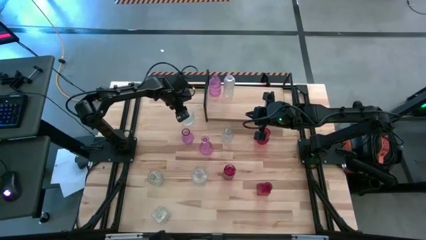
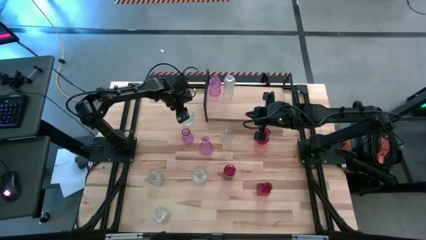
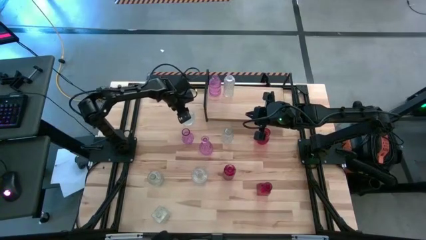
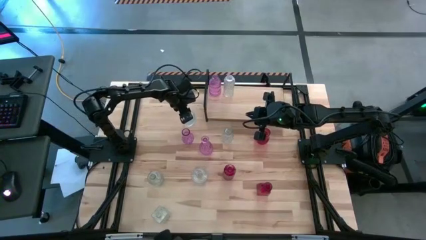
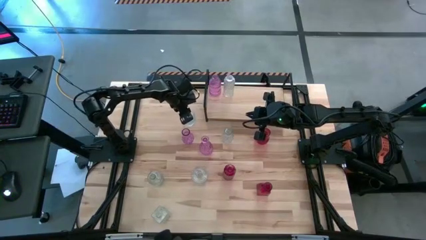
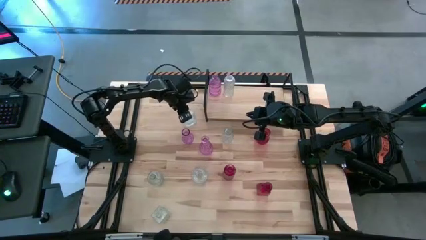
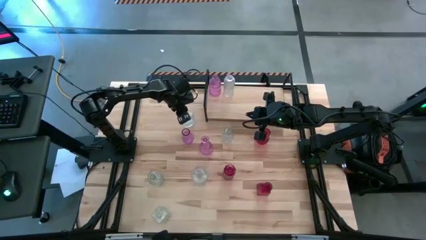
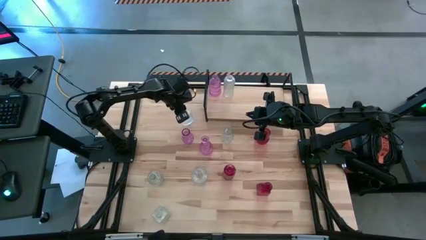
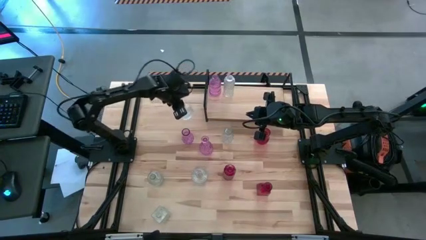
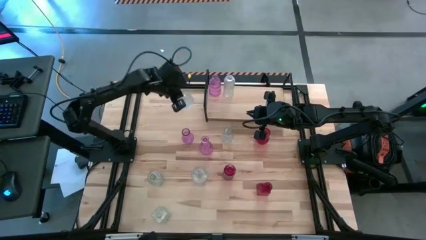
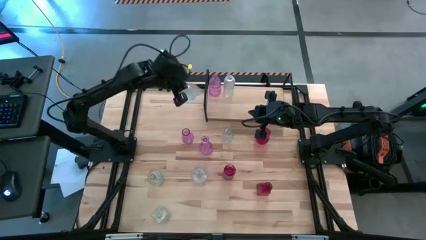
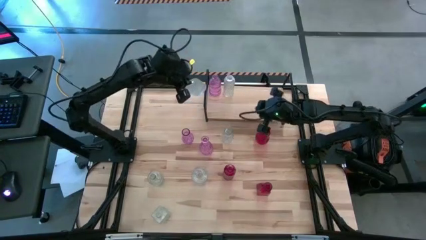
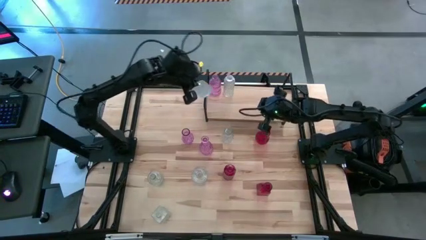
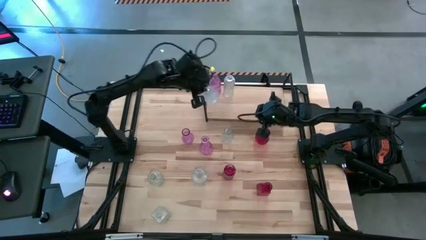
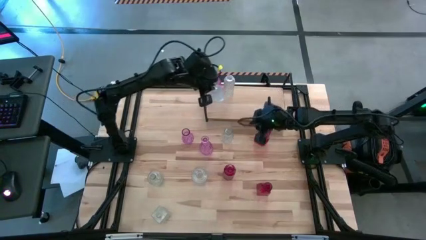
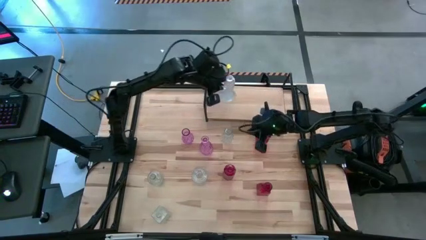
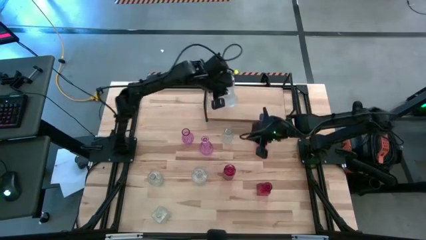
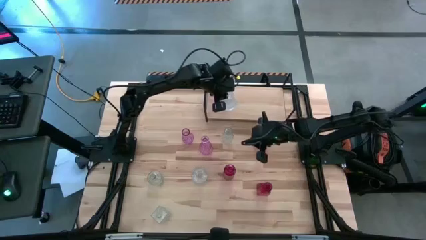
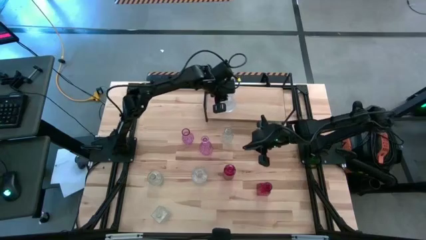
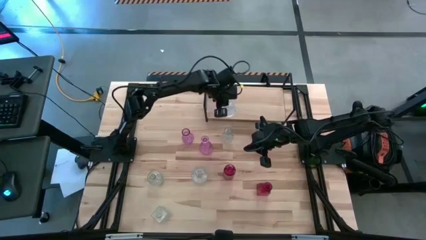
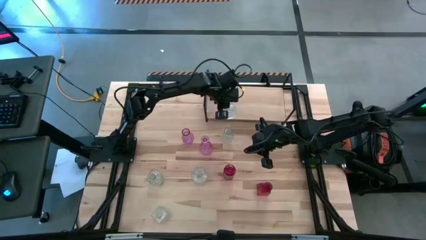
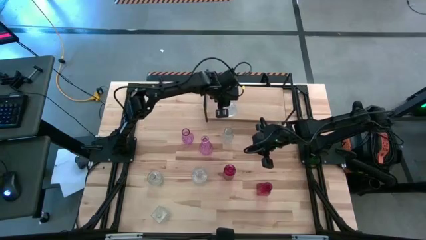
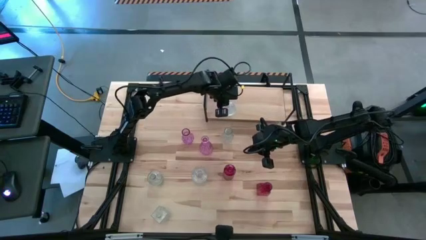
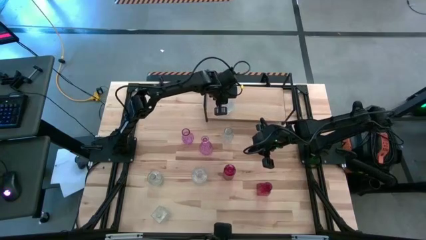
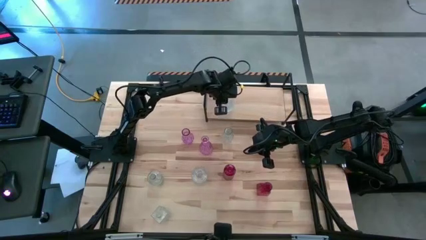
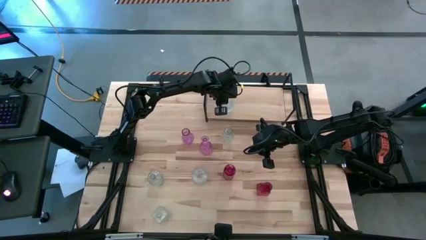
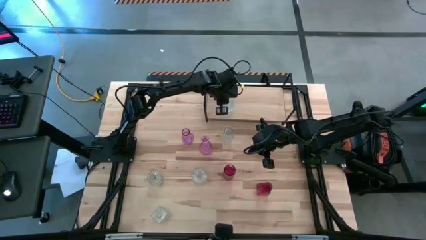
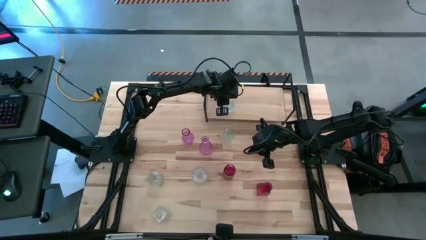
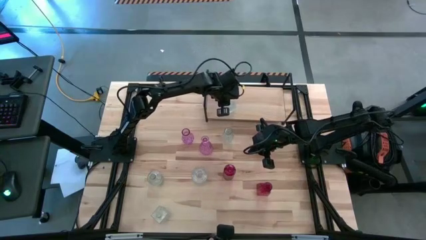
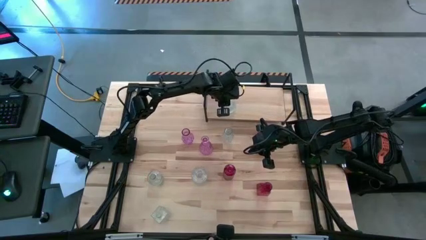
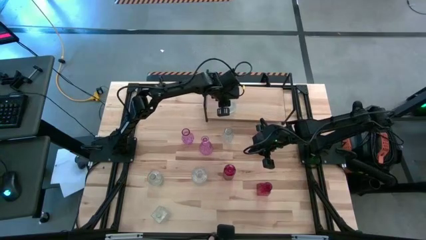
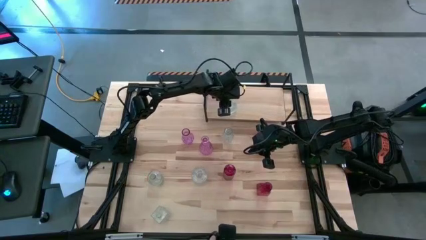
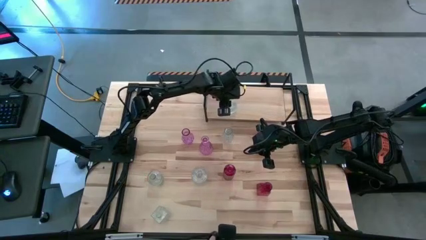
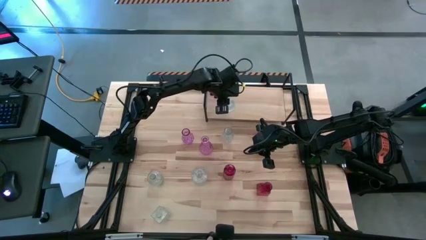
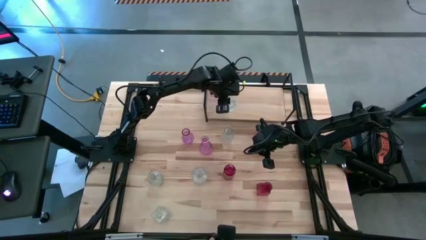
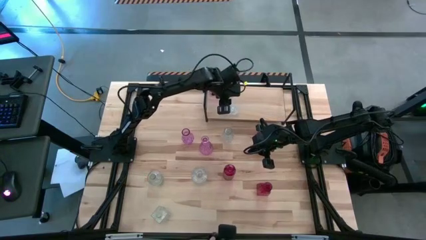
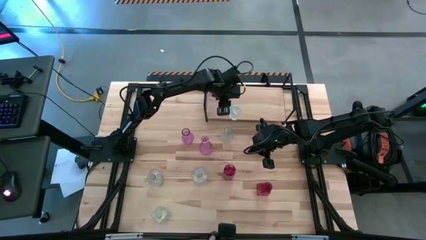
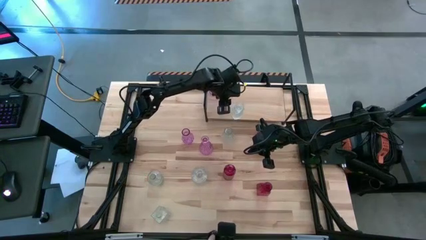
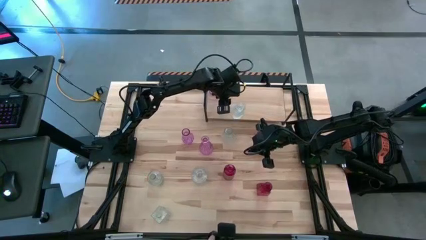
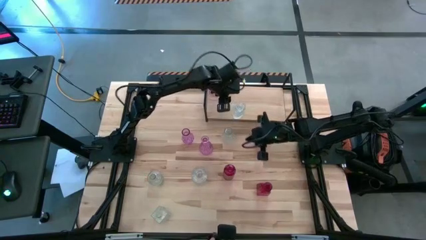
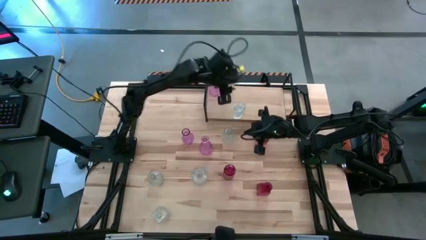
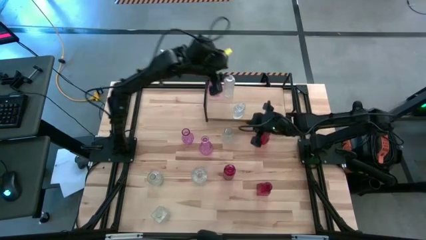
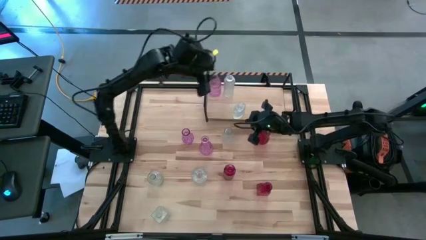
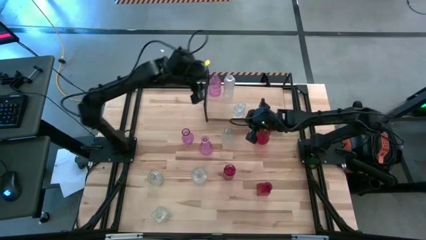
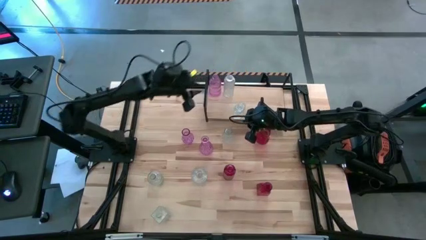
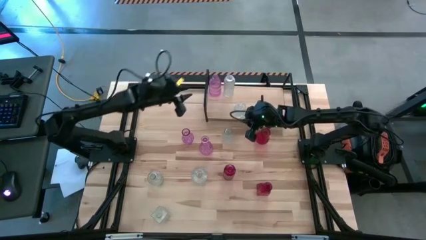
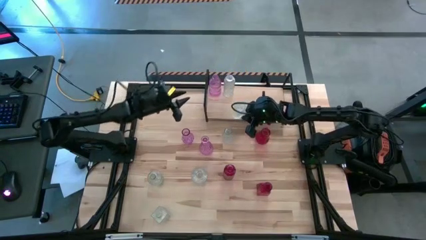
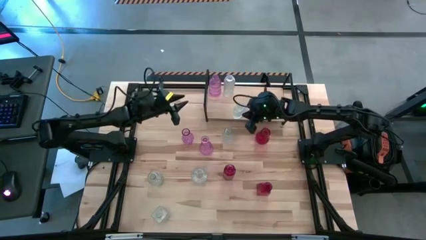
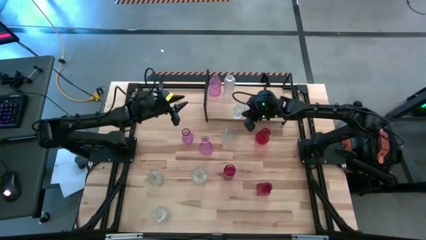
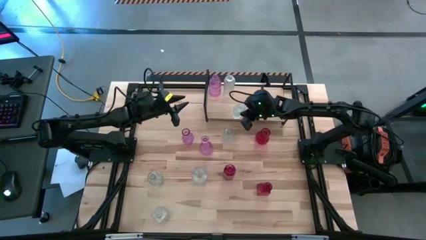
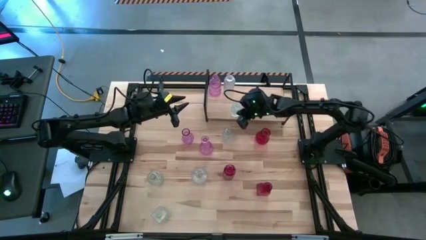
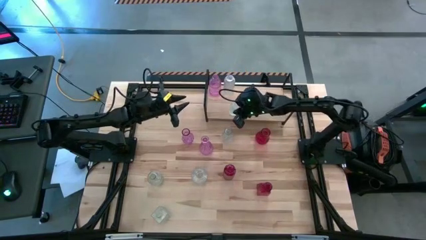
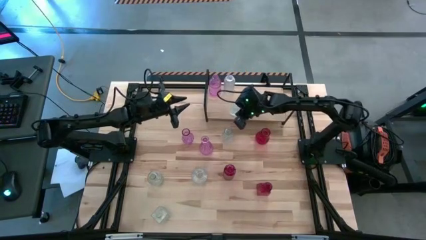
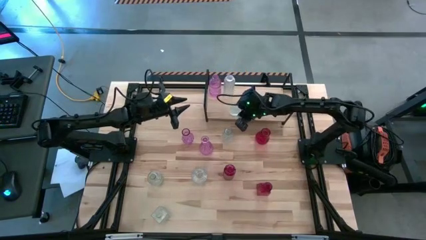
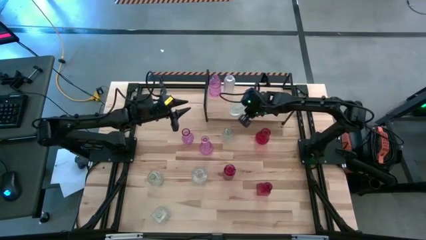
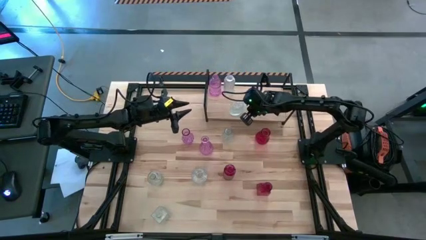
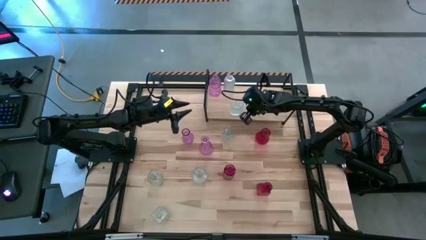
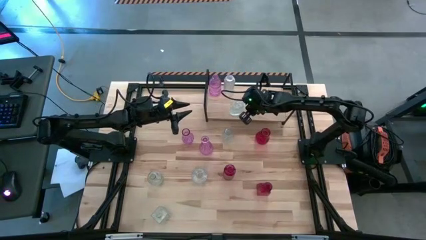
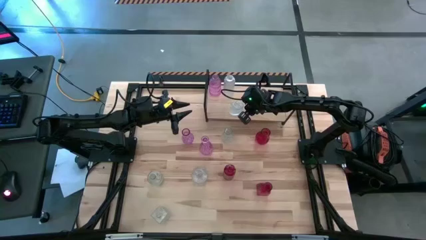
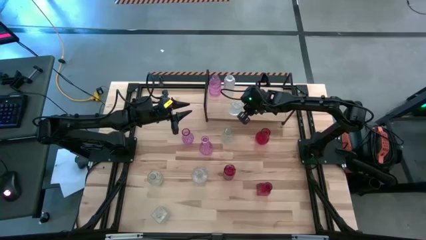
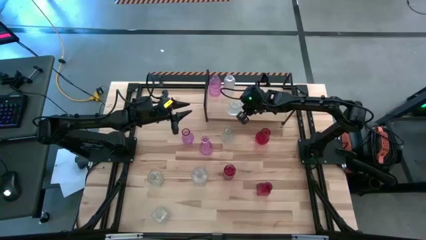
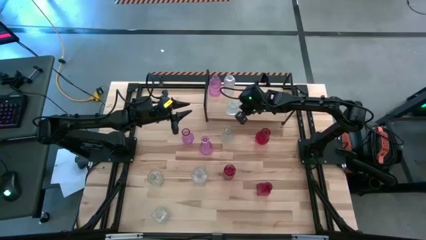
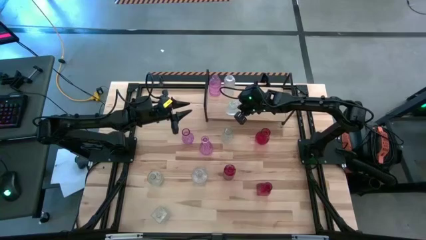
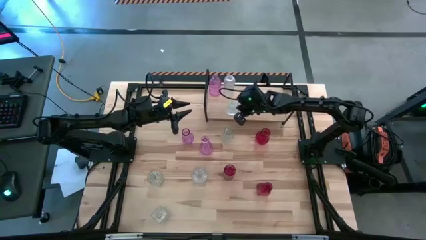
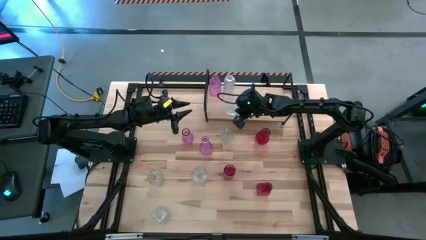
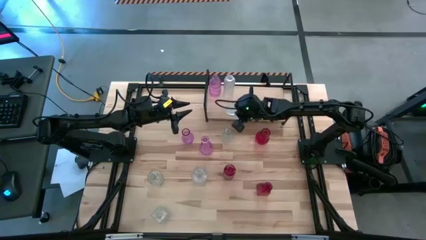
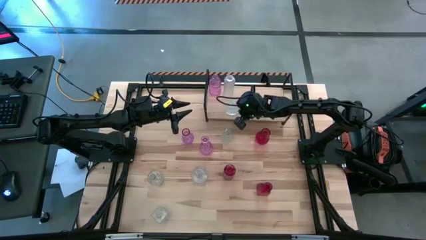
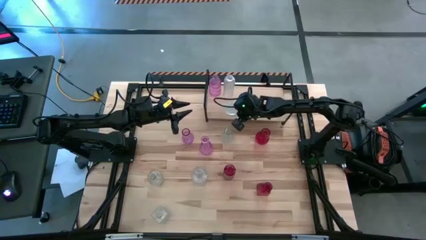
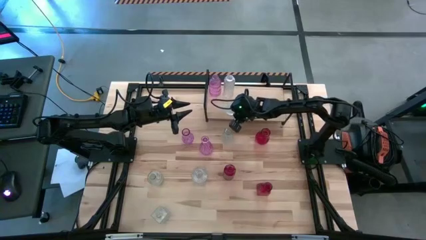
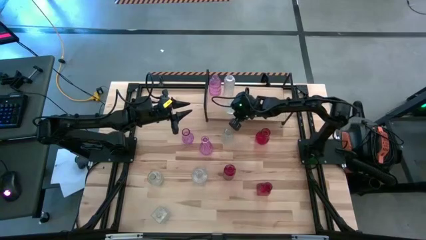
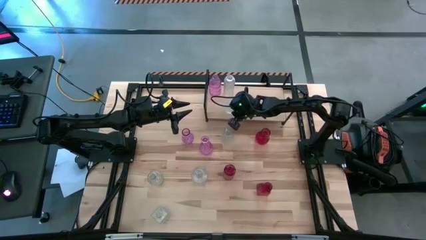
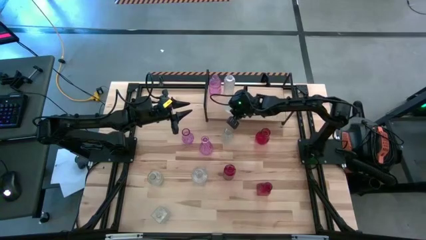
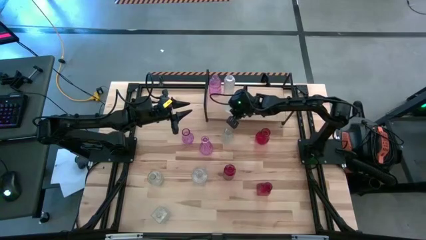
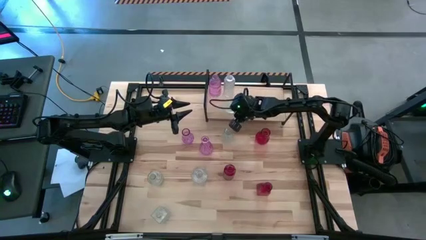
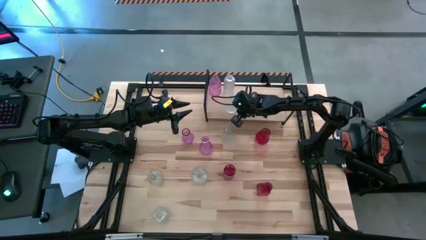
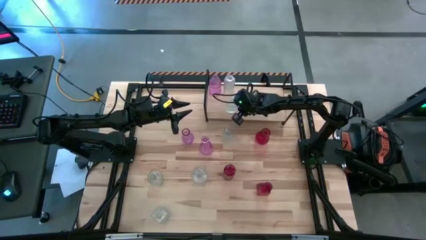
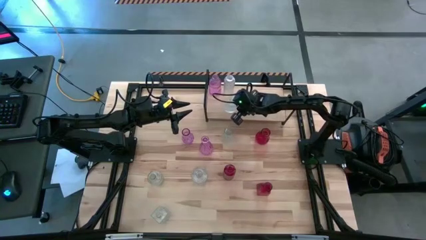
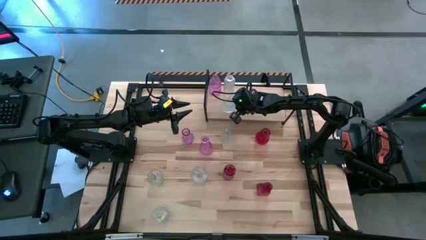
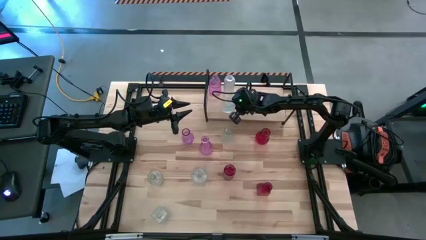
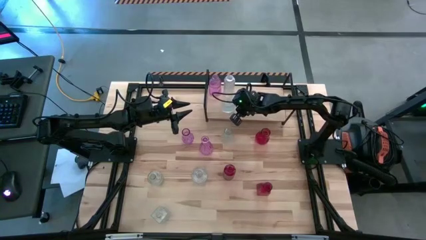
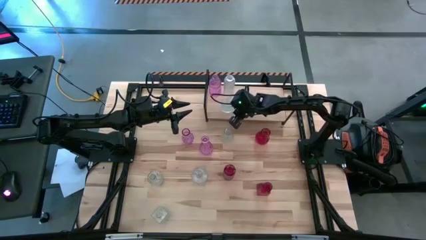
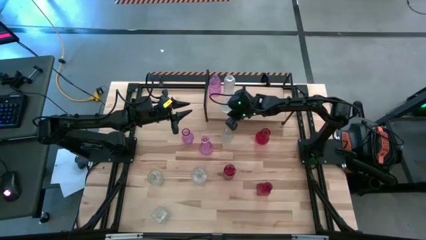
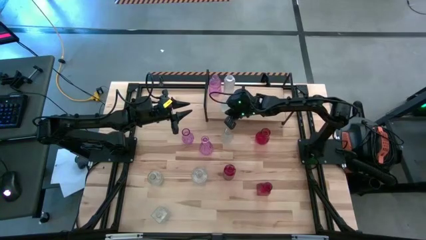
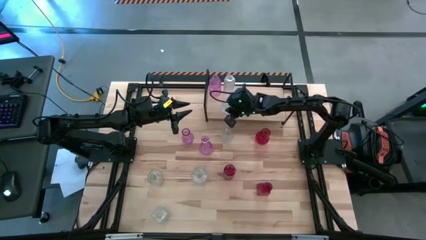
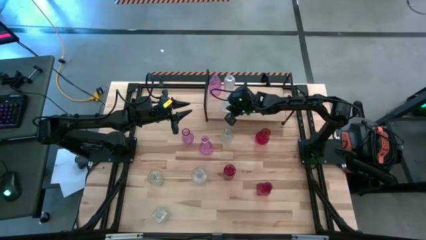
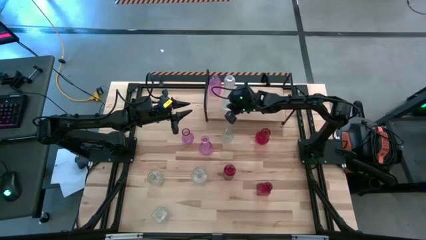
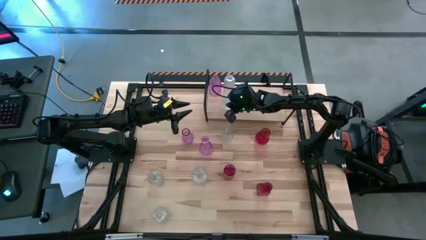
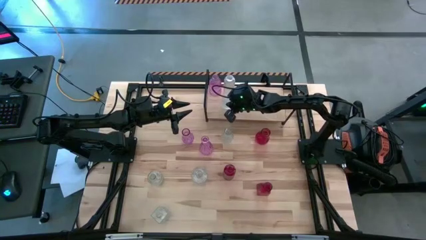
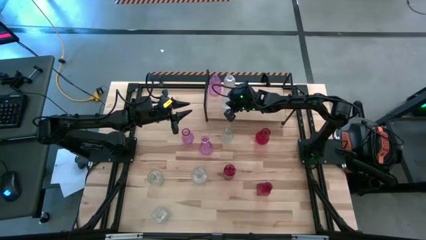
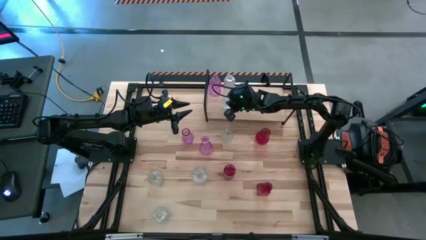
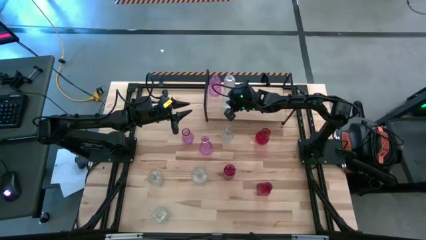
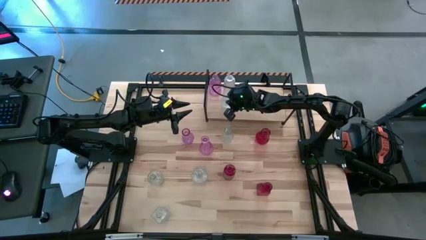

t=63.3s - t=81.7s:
Task: sort vases onto shelf
Align the transparent vase with the other transparent vase on the shelf
